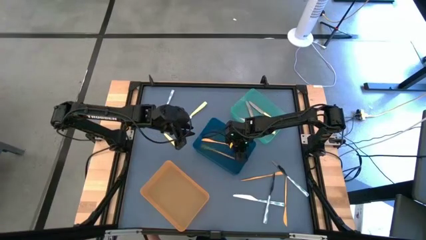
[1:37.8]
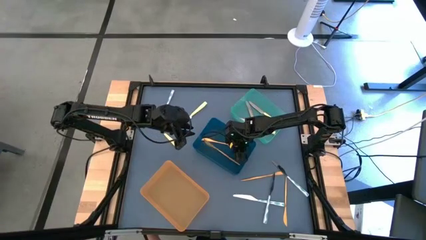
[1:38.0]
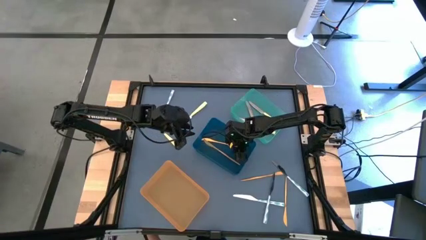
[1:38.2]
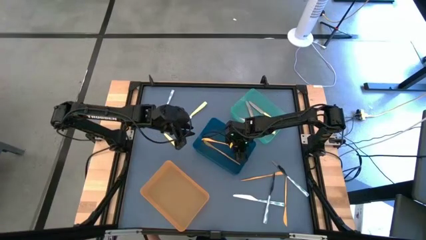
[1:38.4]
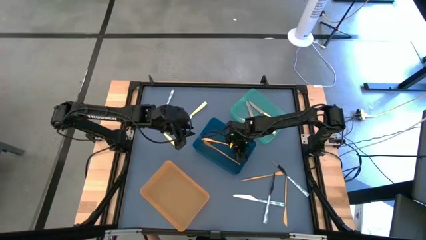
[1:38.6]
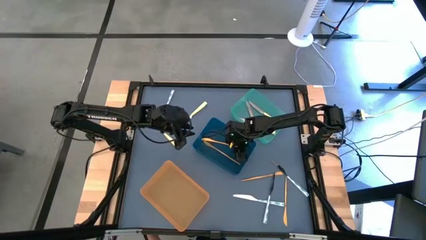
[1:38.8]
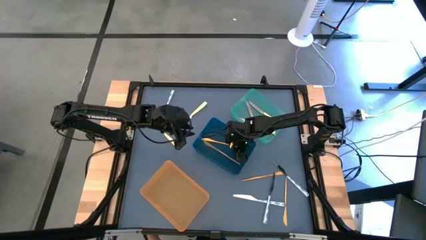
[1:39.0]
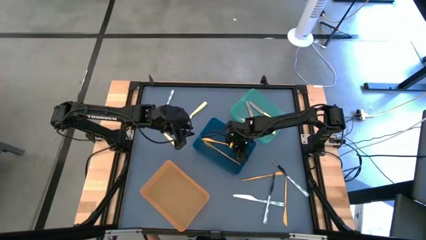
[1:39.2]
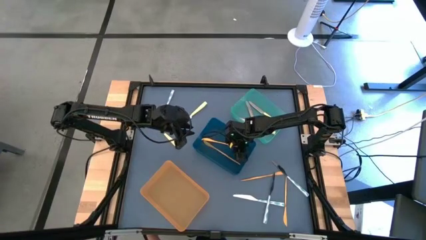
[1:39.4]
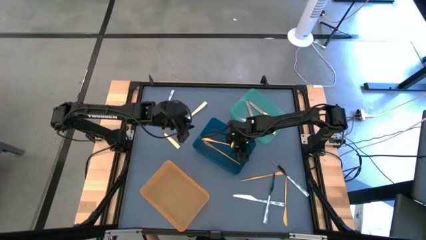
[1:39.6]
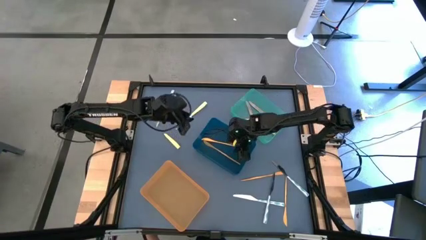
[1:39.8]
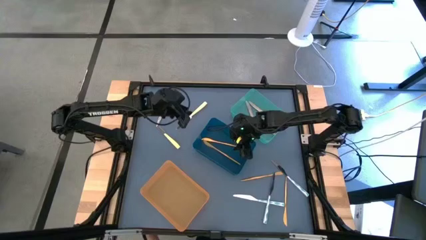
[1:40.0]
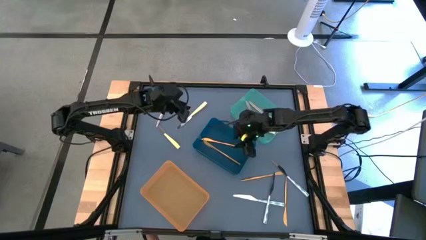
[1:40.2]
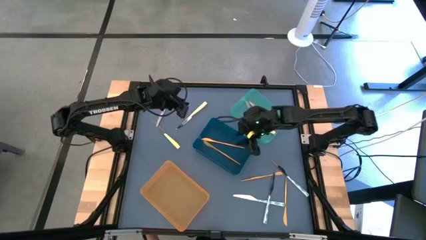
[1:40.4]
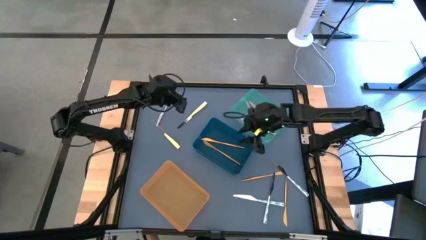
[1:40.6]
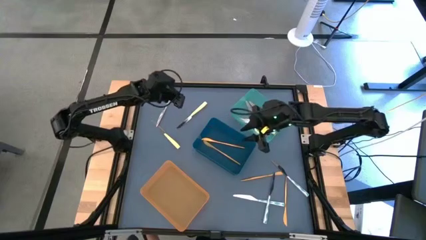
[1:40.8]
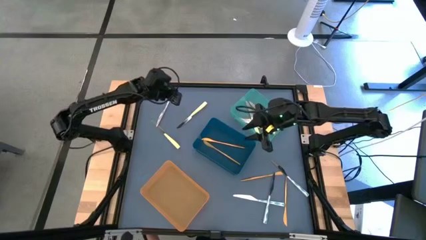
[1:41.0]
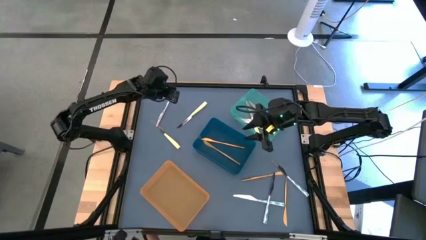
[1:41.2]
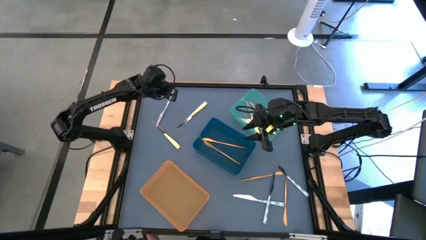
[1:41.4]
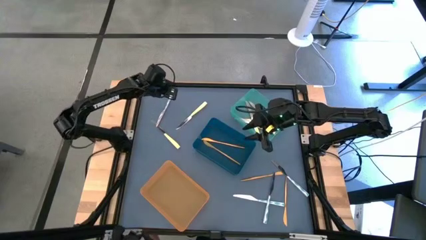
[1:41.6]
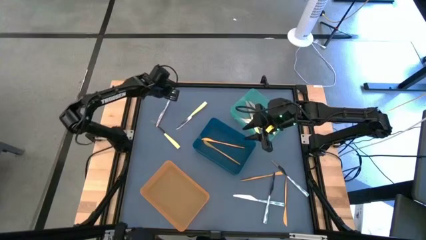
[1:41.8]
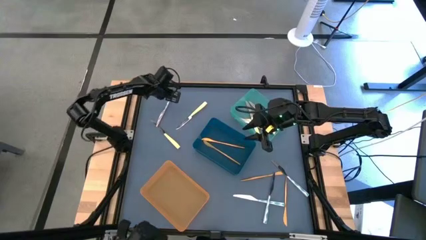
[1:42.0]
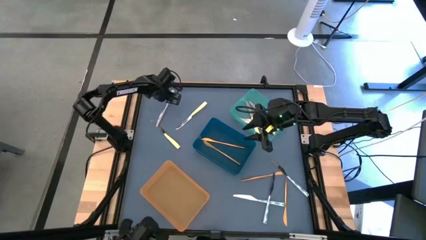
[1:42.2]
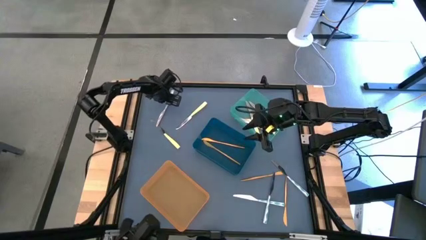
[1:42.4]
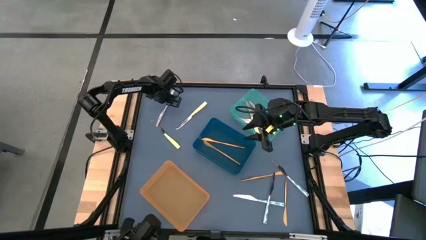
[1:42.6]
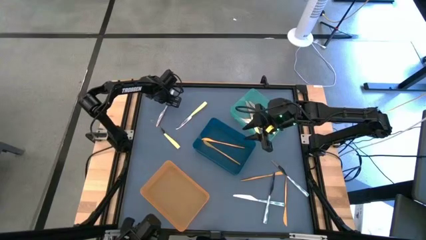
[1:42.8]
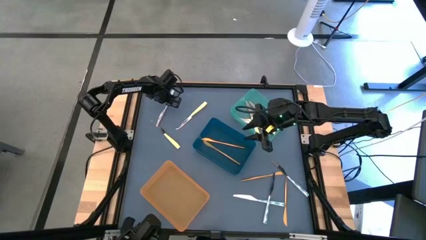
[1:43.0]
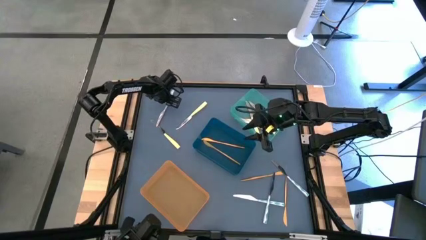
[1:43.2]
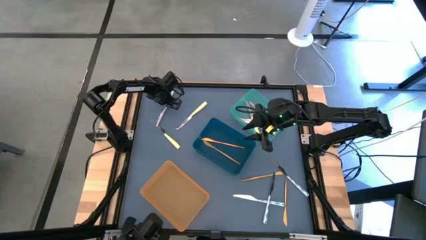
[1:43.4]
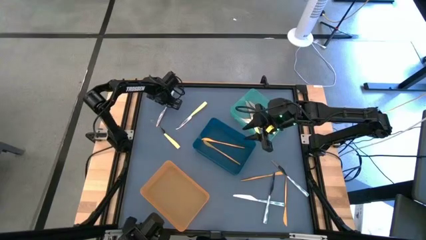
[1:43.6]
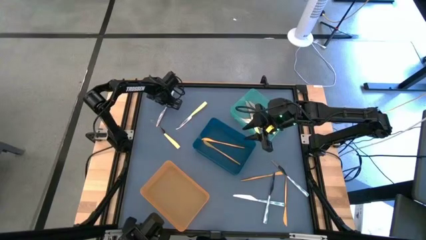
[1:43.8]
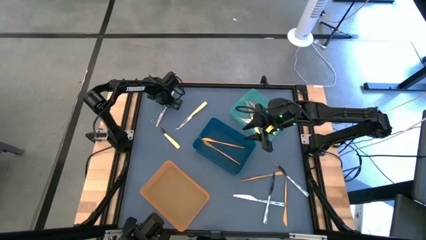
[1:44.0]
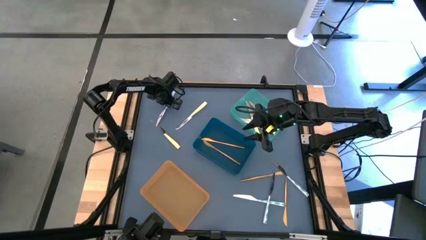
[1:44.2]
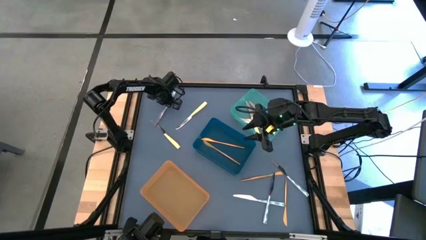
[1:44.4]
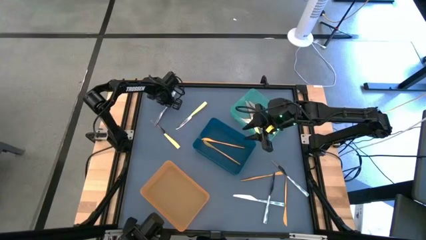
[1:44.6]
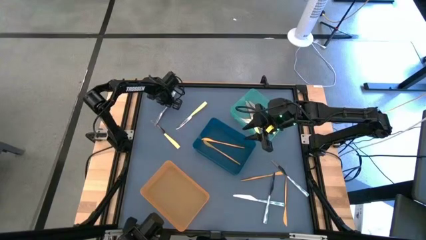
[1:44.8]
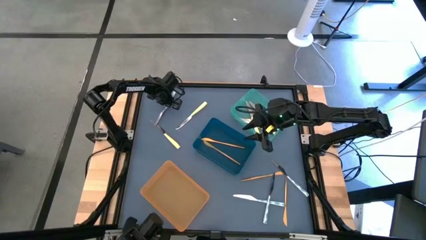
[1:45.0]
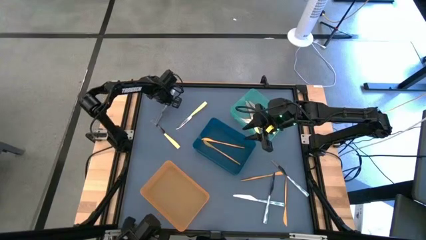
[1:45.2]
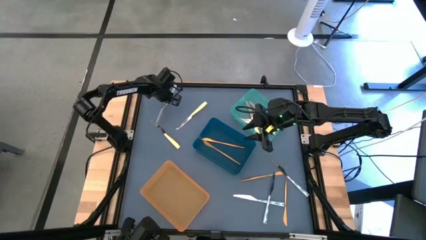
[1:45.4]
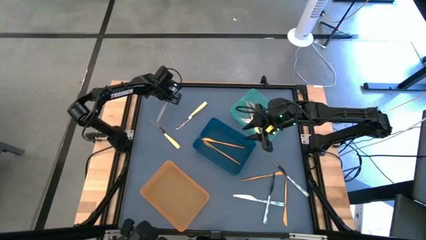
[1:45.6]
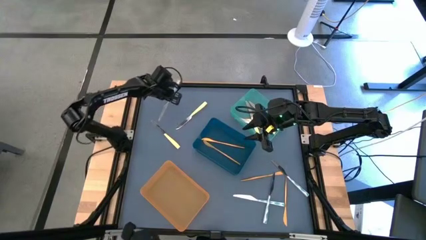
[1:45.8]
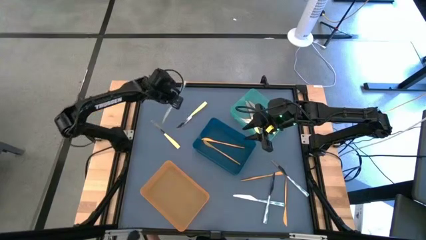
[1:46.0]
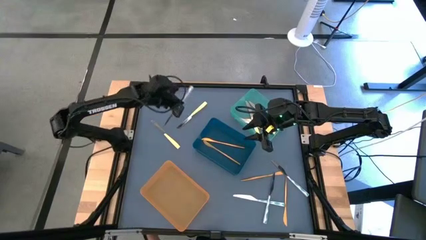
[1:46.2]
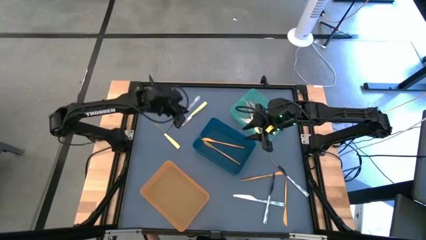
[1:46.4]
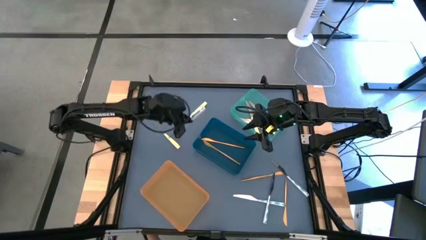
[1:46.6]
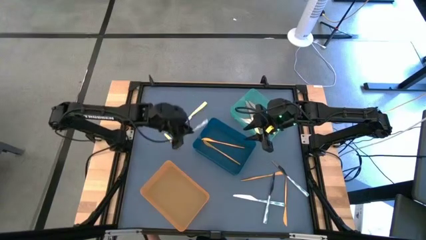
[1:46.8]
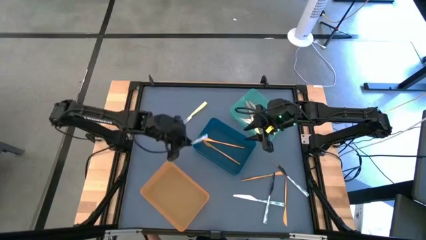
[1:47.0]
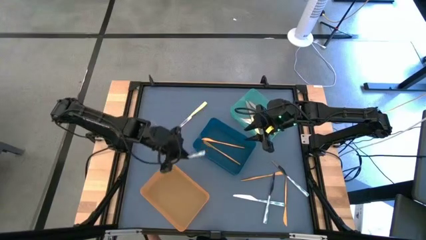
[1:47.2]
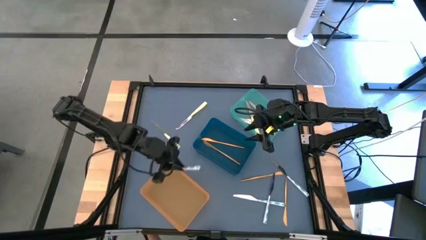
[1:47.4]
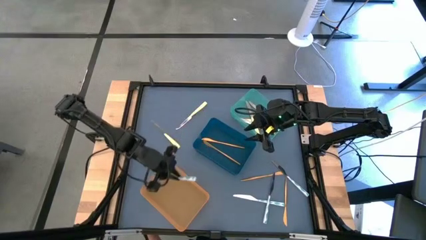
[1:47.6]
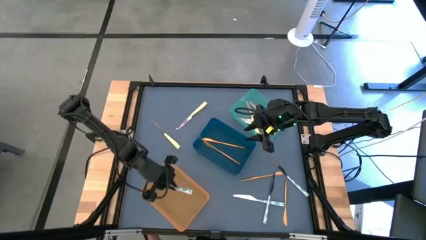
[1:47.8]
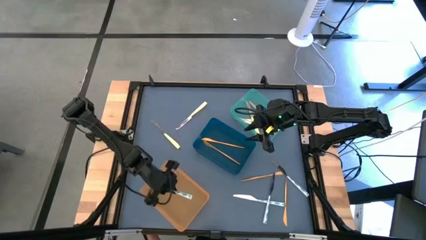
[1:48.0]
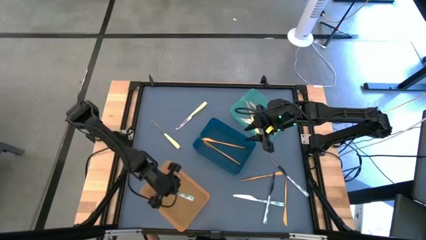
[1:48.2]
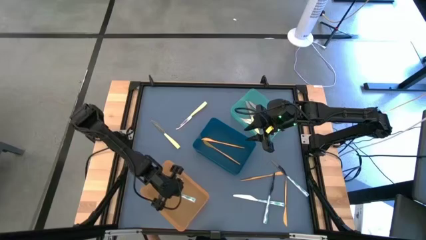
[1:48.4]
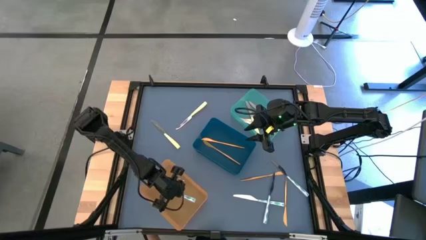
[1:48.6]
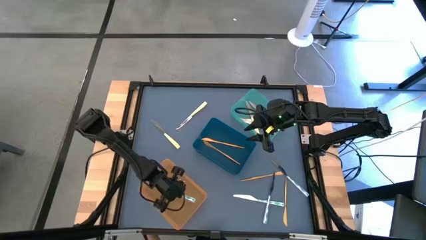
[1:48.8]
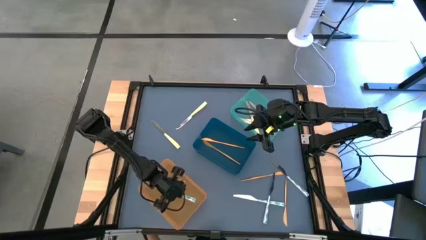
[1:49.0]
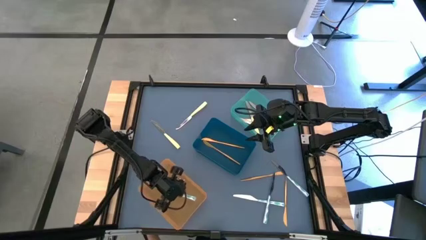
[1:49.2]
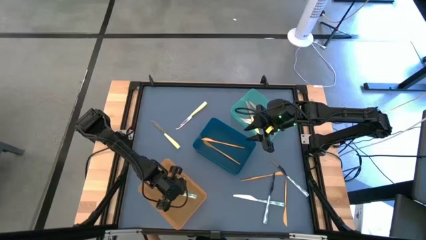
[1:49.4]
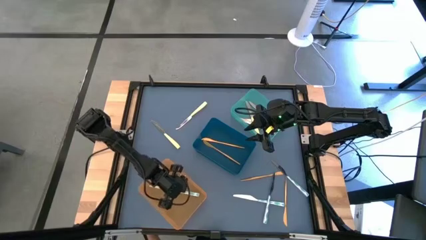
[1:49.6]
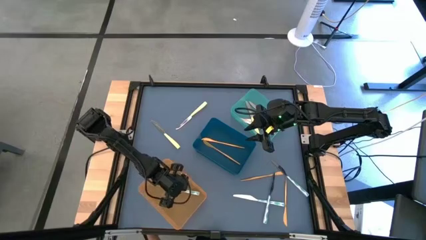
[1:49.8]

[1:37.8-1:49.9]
Task: Sort silverware by color (type)
Put the right blue knife into the orange bin

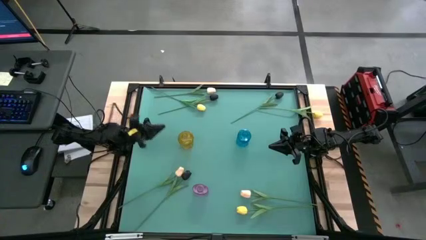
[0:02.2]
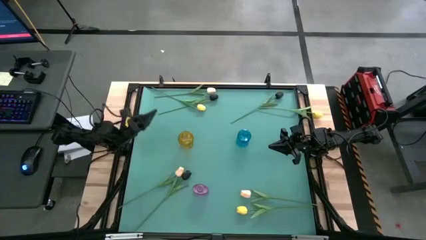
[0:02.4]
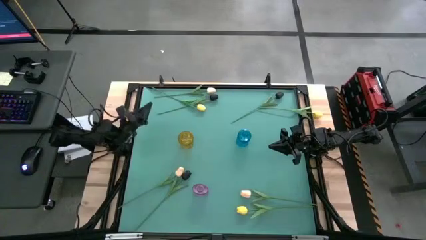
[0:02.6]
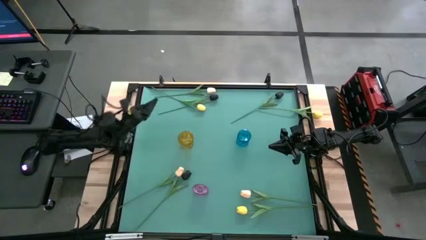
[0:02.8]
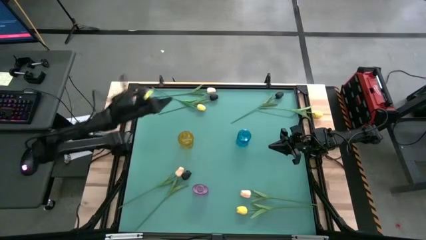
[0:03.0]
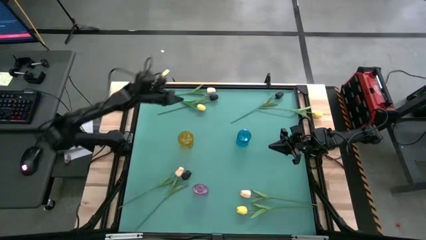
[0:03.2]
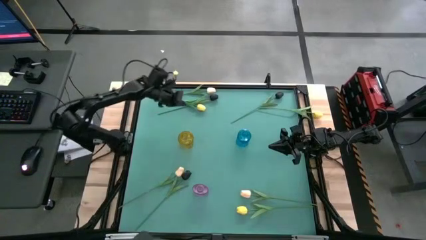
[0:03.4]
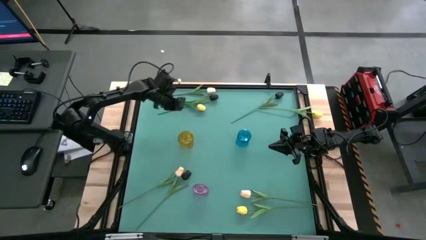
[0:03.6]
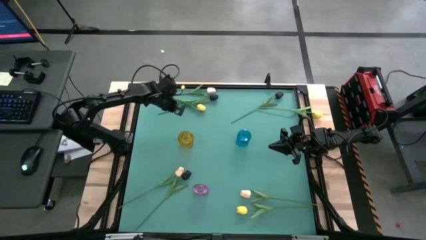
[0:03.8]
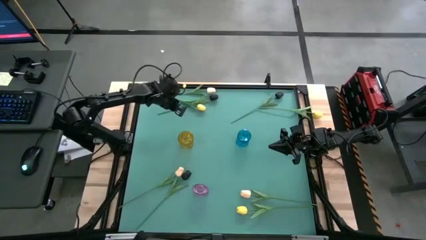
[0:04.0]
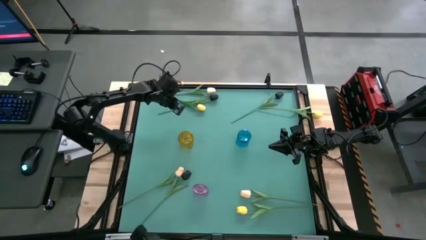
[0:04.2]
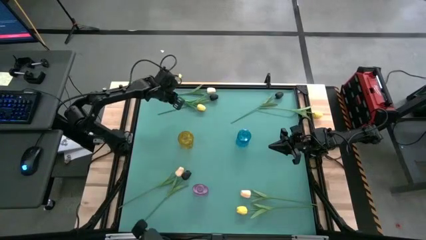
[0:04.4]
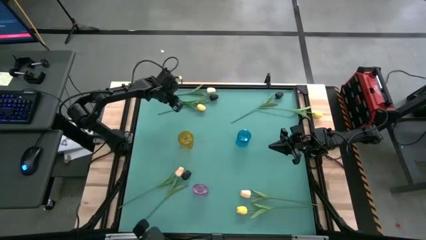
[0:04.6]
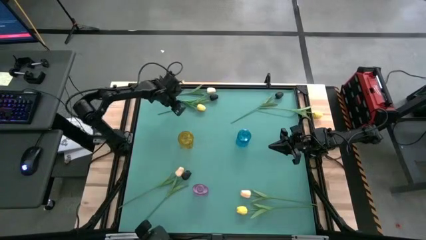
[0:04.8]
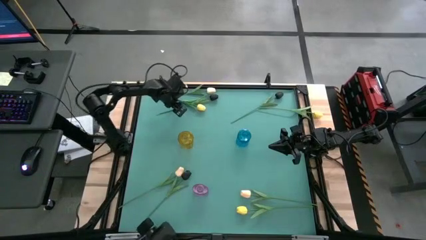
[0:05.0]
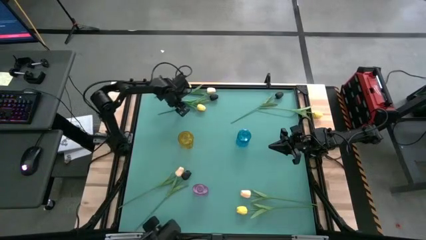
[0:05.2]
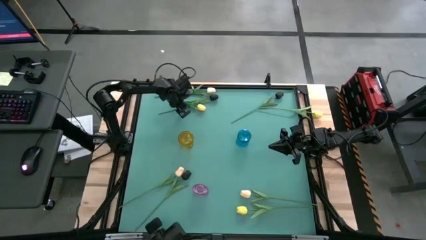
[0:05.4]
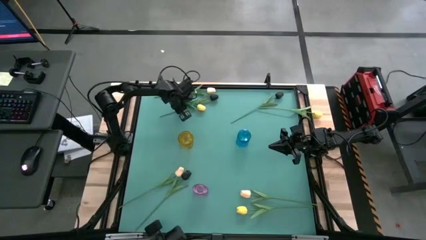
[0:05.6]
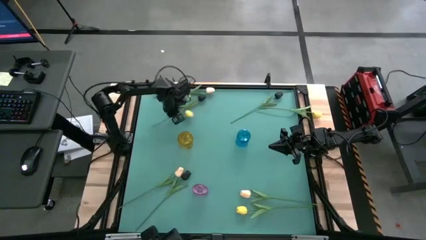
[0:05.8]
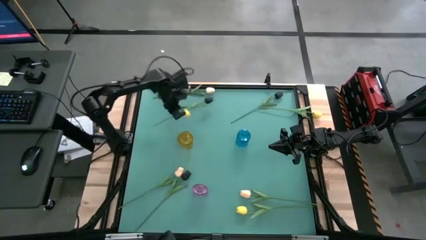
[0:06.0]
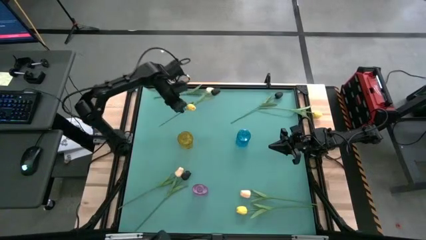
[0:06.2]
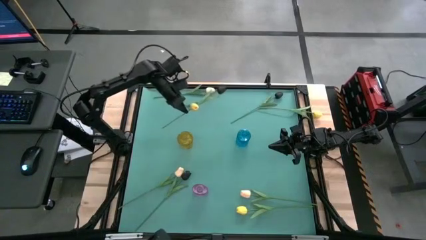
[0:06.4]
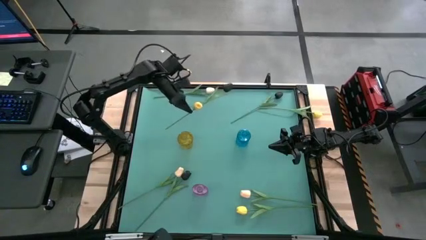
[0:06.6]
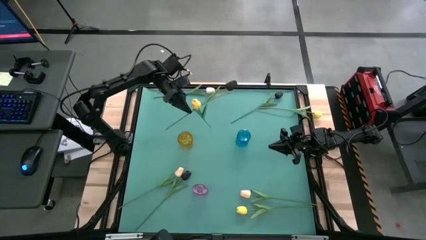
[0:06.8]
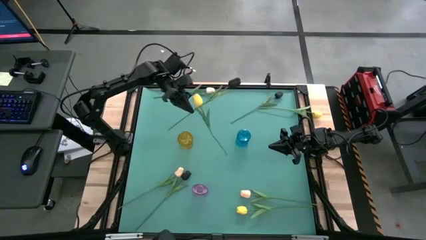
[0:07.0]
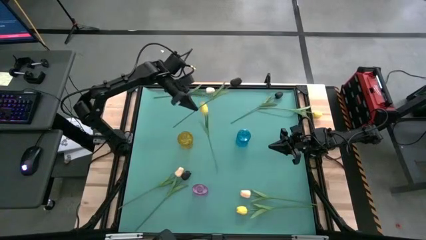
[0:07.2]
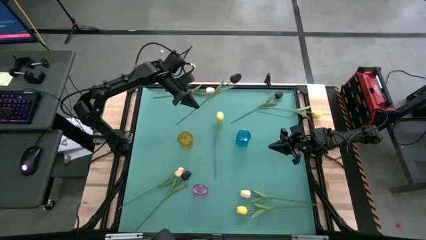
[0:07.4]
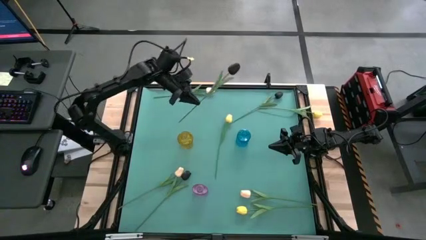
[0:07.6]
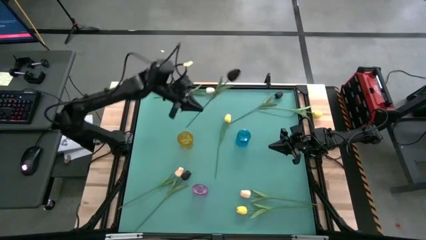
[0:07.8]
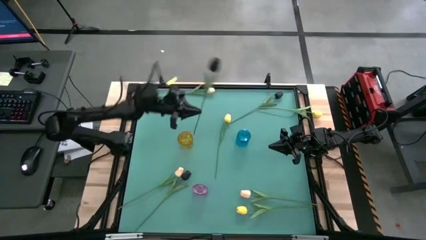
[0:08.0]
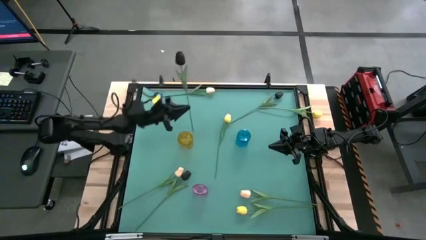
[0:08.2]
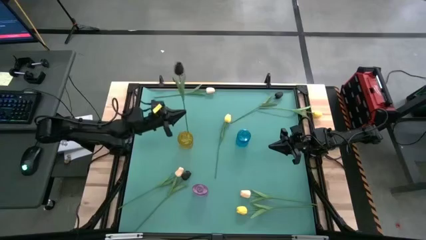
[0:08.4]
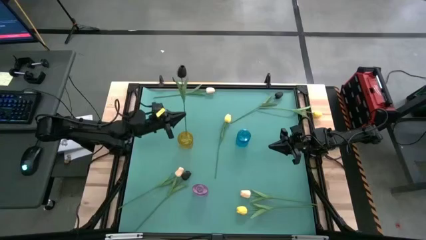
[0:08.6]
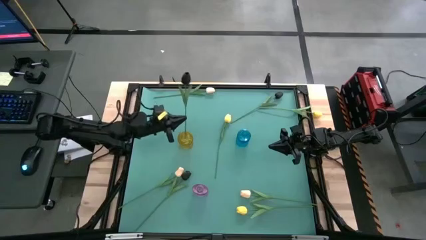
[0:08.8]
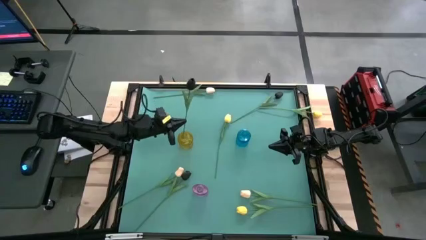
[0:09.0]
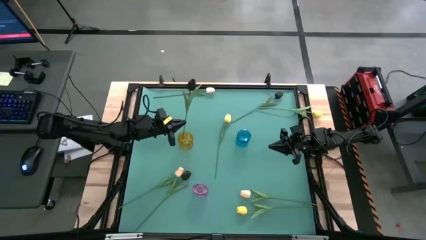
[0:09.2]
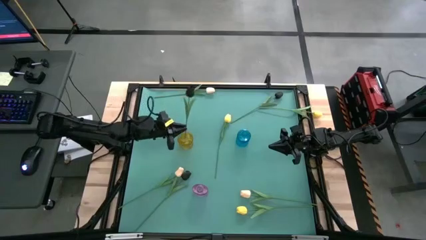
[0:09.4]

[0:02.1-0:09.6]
Task: Sort flowers into vase by color
Put the top left black tulip flower into the yellow vase
